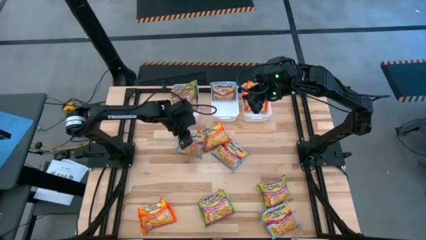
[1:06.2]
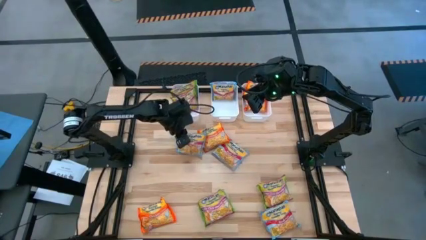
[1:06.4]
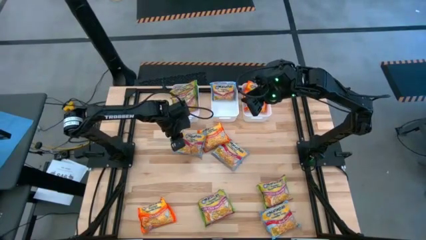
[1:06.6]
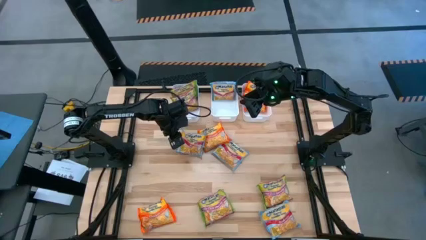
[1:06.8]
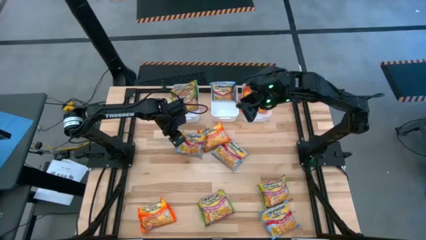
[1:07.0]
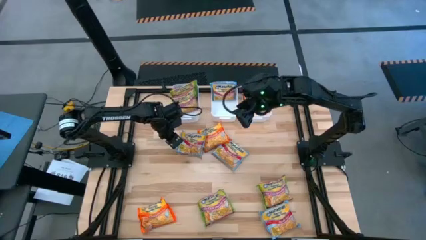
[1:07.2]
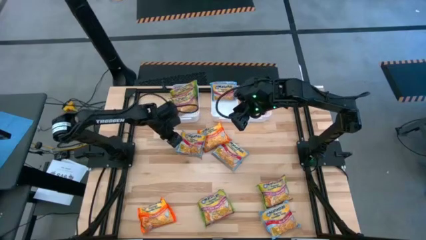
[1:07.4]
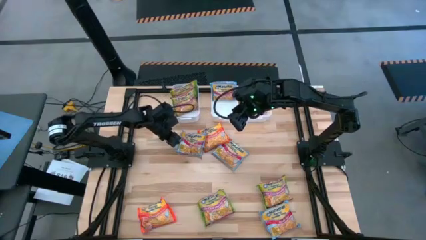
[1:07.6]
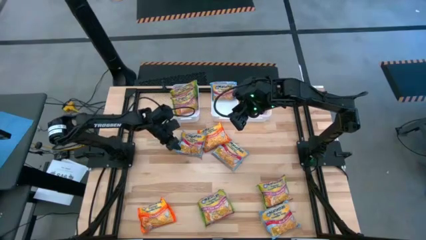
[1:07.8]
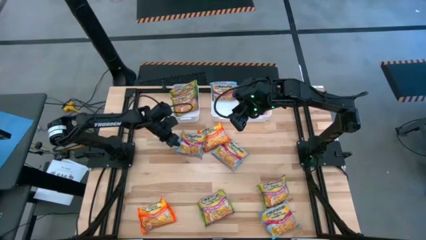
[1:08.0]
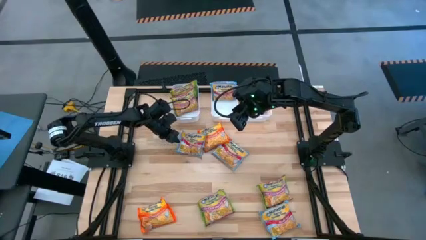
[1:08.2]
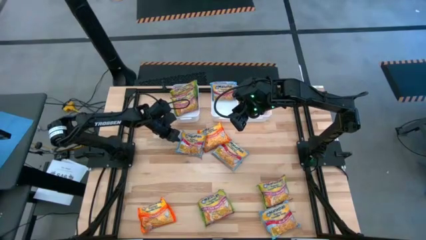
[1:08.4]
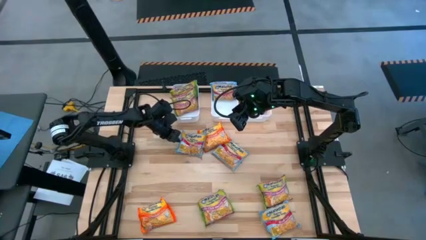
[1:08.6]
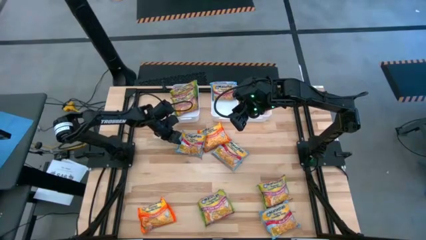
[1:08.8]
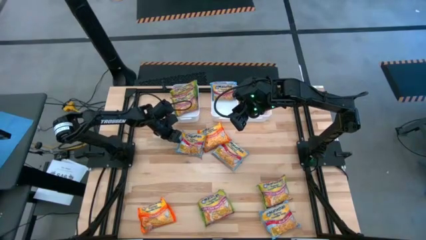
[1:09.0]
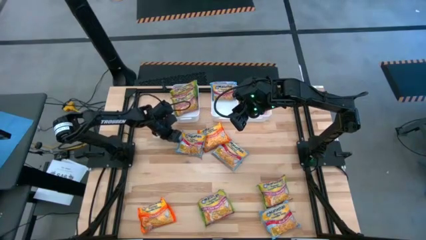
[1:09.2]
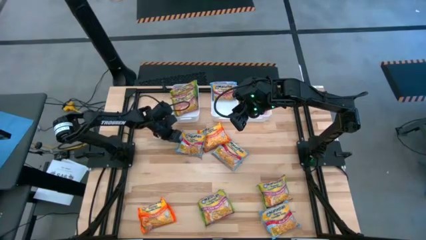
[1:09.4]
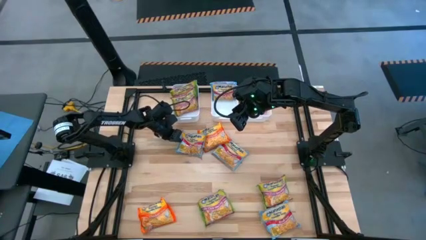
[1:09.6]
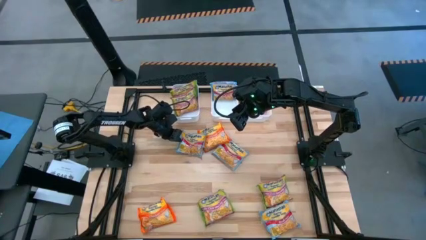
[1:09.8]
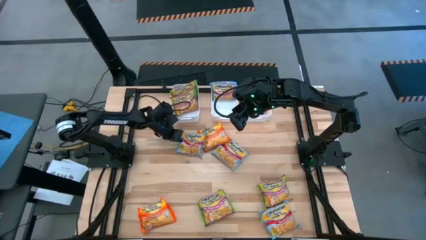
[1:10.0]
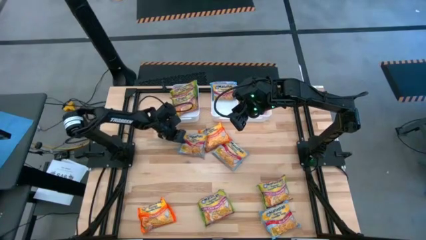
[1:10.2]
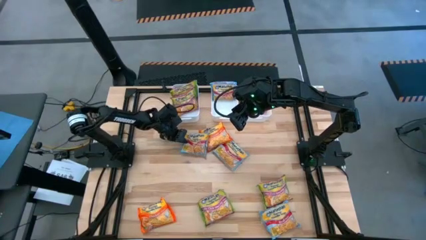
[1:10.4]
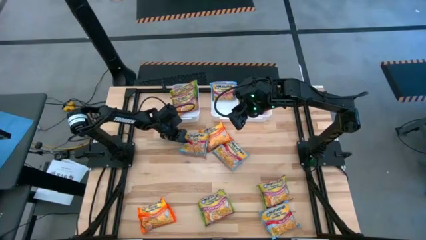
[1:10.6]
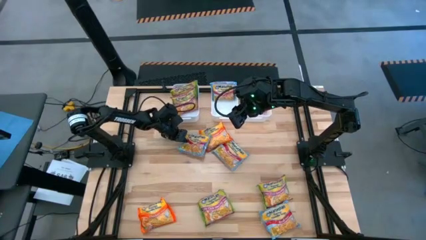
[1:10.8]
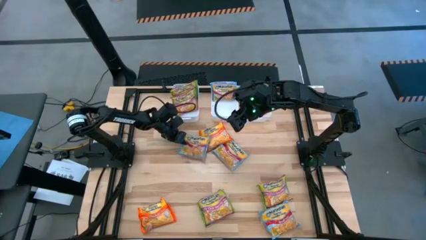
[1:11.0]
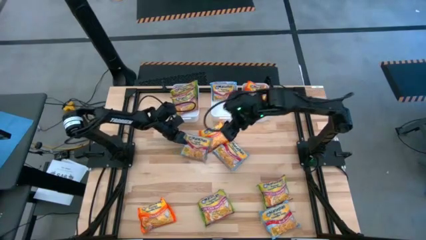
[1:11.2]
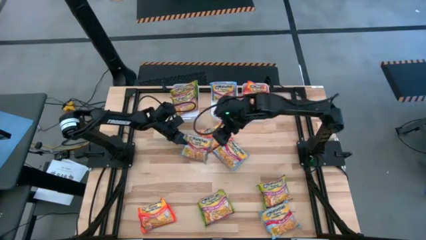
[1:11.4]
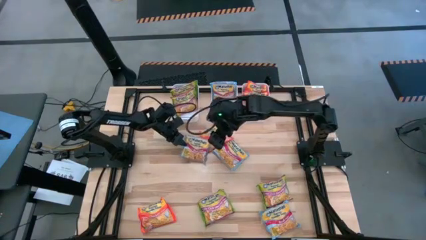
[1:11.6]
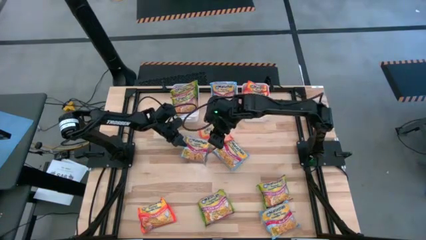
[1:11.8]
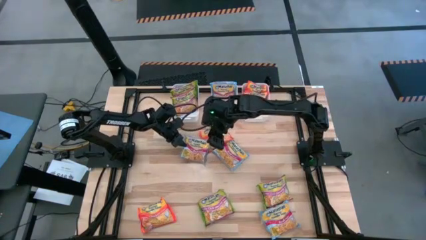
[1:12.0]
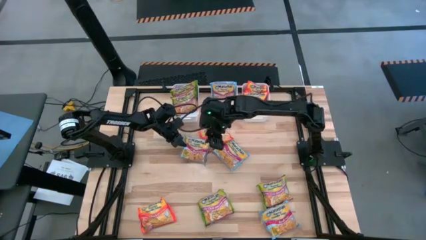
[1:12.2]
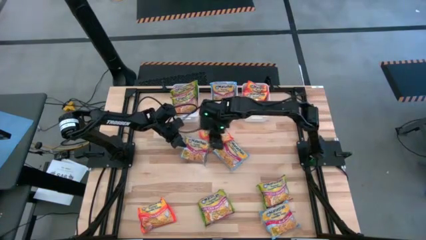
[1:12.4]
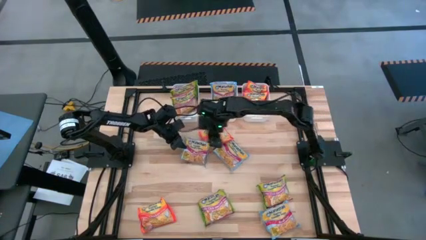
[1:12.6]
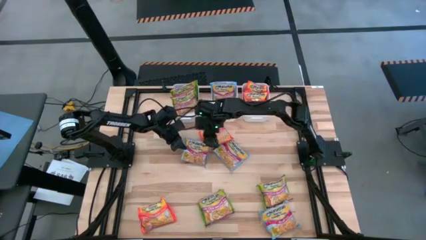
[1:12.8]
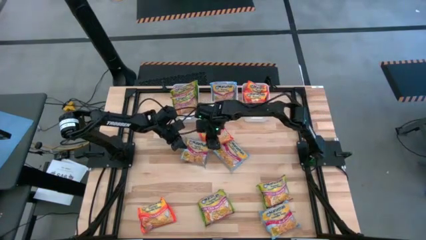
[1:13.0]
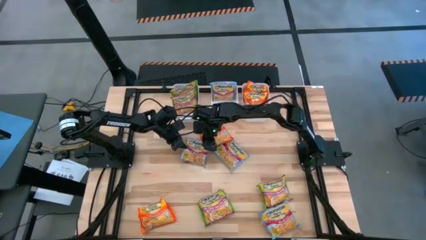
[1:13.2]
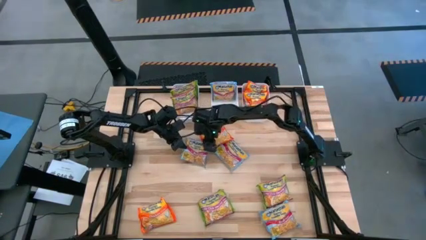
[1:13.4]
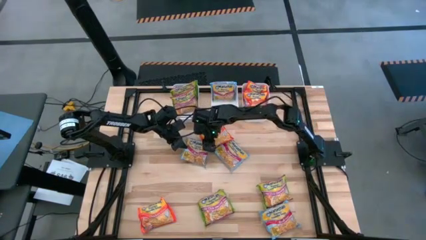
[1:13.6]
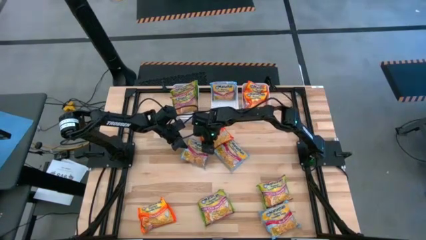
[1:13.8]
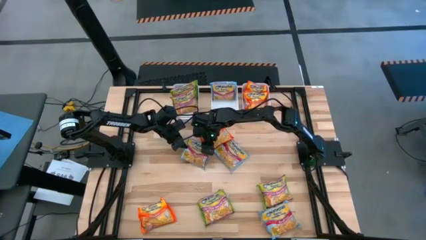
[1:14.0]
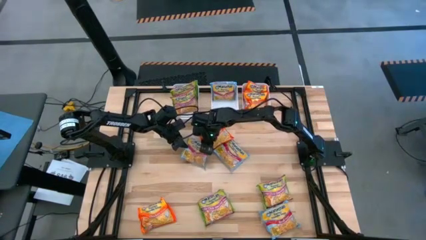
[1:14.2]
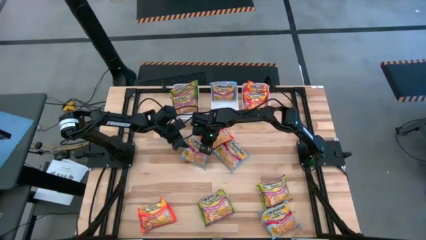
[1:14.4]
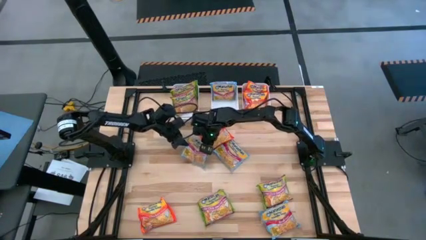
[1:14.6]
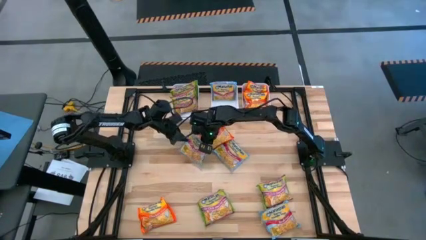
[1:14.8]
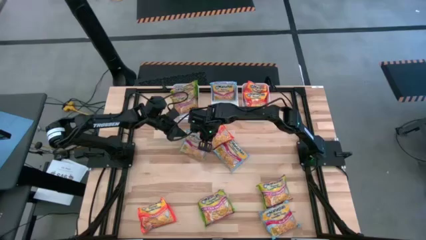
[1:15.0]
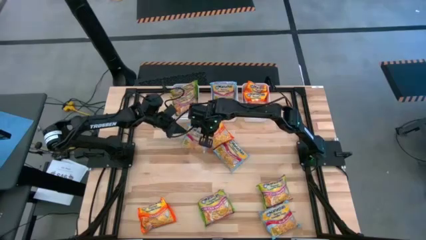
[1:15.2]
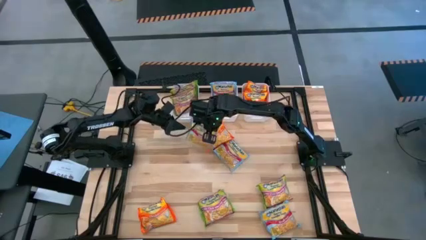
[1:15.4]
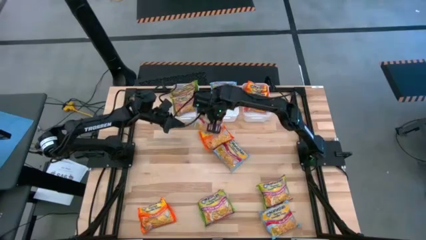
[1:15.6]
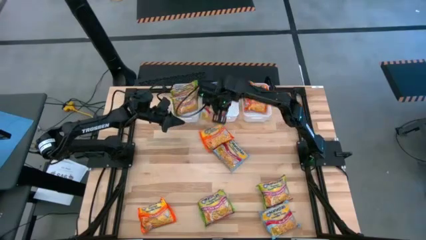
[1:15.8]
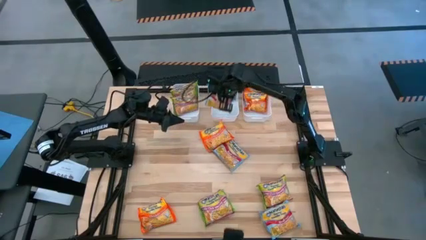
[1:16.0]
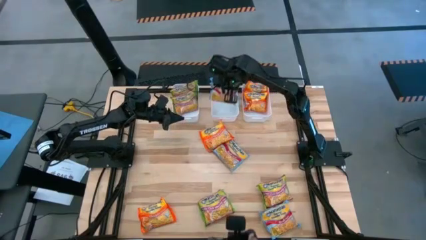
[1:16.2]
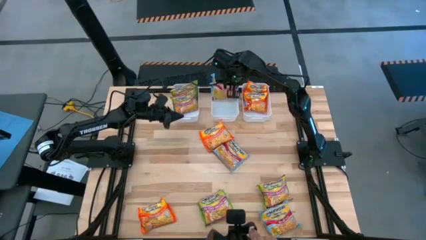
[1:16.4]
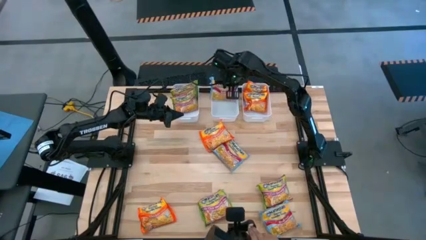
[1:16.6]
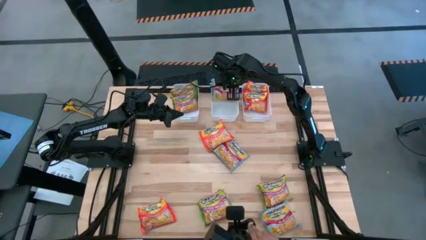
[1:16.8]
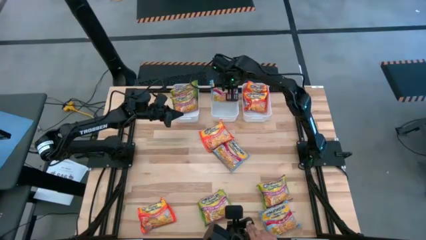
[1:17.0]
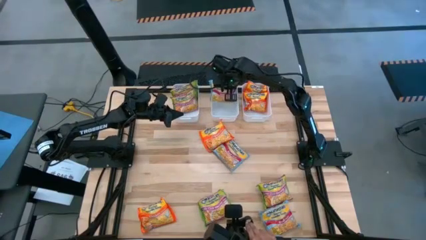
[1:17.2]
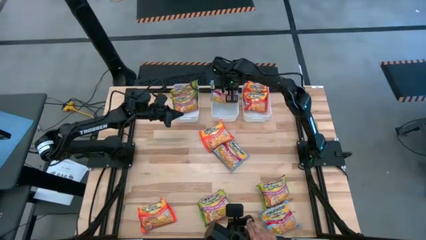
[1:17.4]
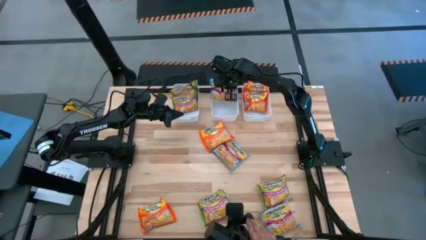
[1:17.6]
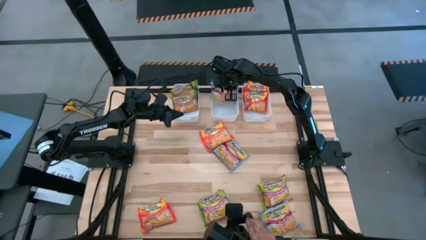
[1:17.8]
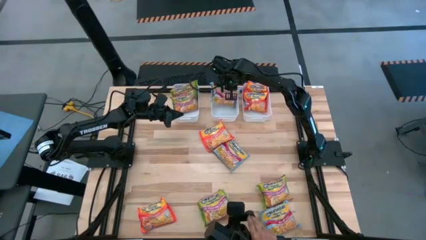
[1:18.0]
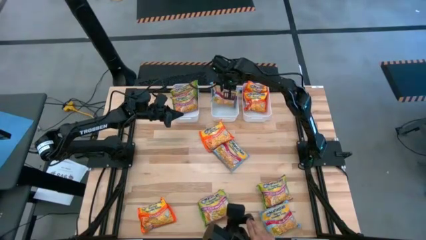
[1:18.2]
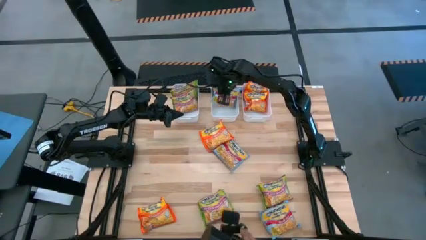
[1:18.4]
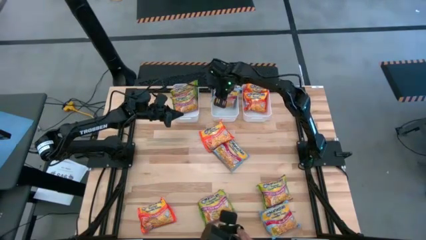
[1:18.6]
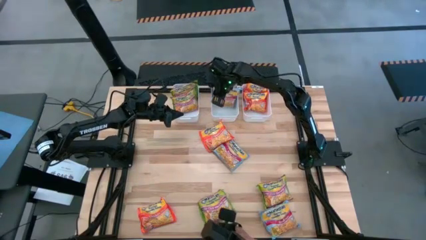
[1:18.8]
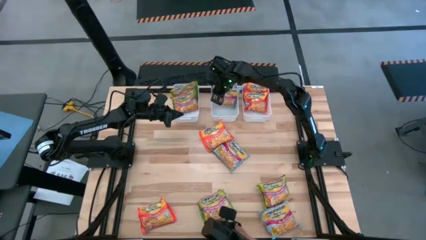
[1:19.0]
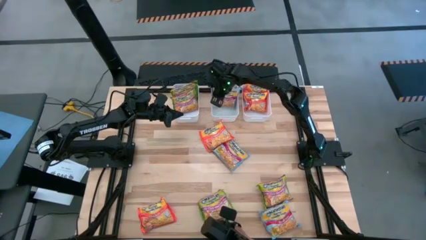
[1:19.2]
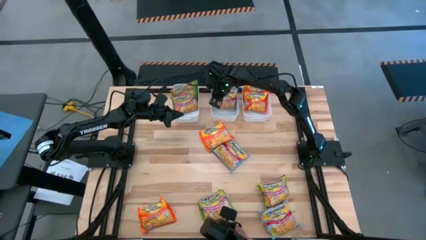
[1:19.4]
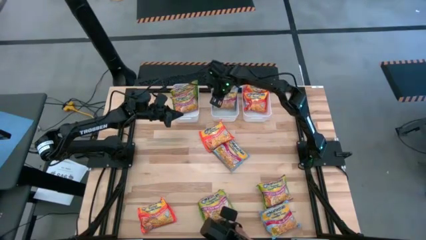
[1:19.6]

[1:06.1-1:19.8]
Task: Sort Maruchan noodles
Put the blue noodle pack into the middle white bin

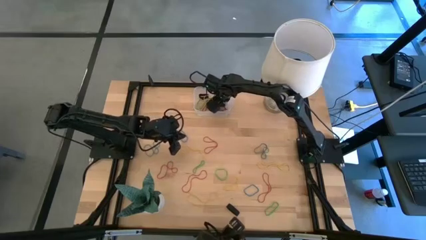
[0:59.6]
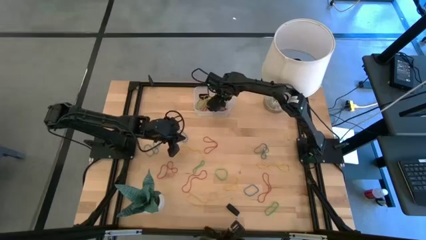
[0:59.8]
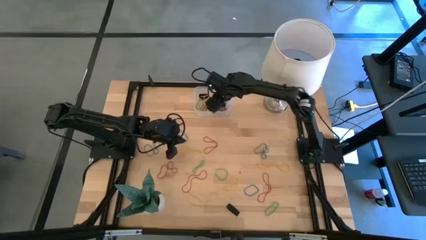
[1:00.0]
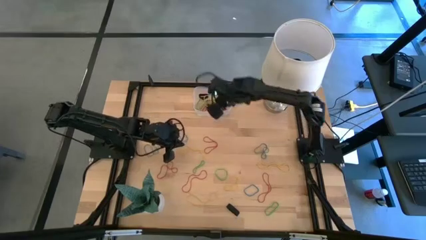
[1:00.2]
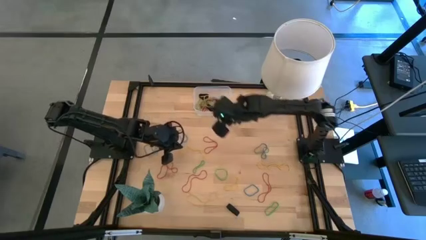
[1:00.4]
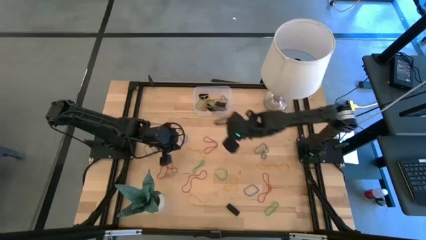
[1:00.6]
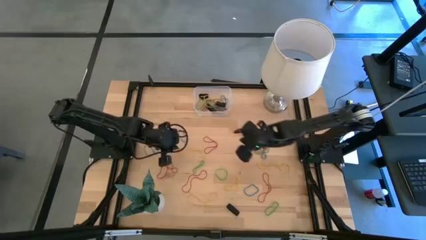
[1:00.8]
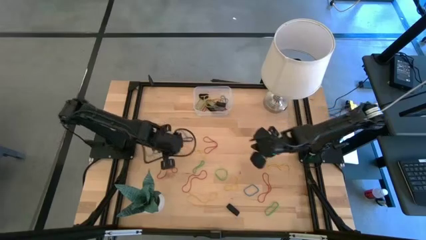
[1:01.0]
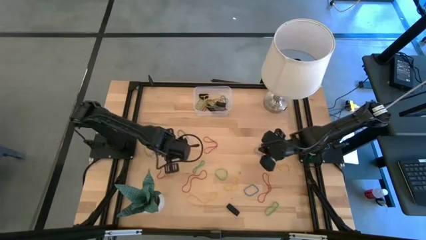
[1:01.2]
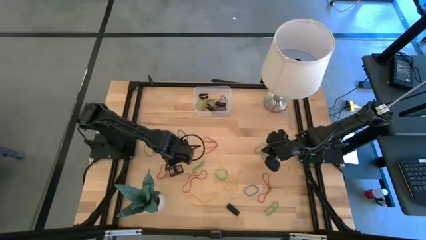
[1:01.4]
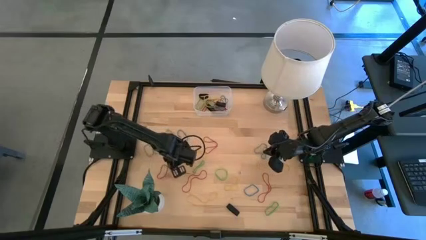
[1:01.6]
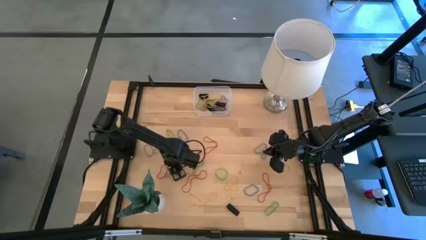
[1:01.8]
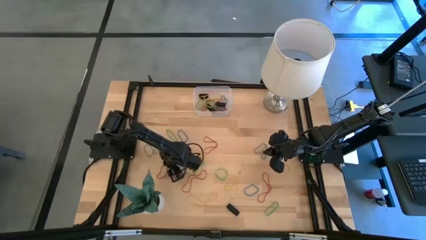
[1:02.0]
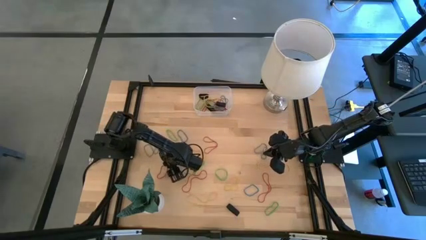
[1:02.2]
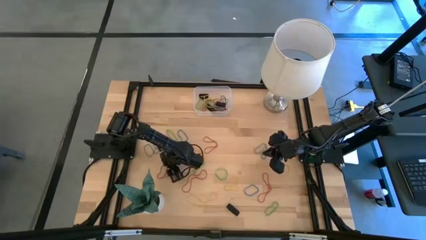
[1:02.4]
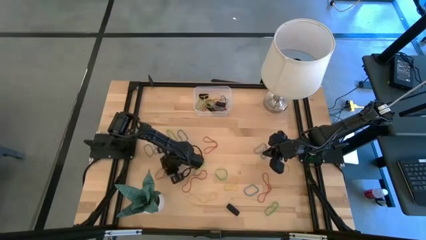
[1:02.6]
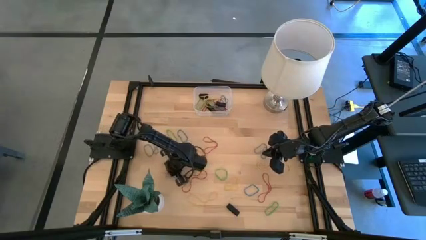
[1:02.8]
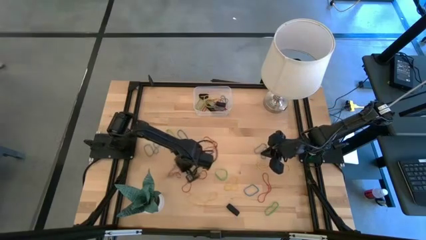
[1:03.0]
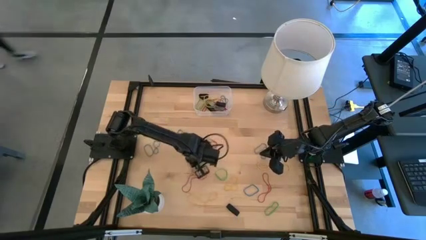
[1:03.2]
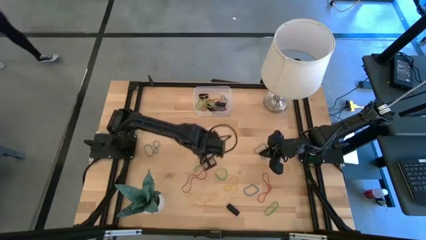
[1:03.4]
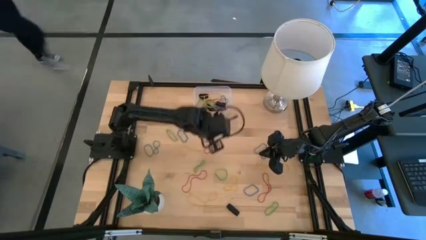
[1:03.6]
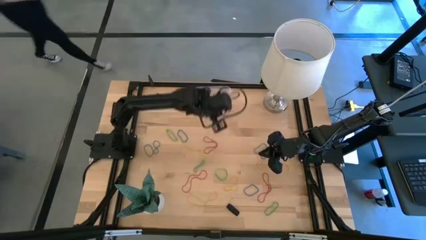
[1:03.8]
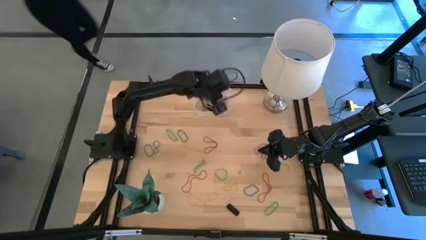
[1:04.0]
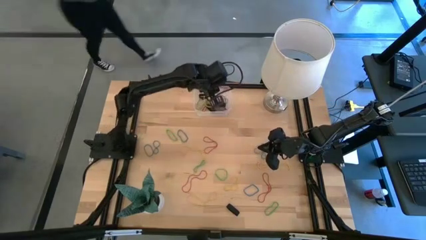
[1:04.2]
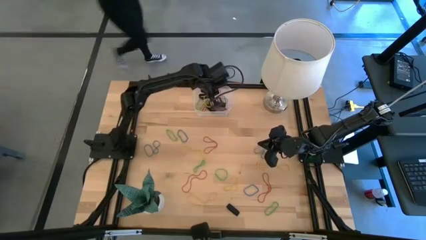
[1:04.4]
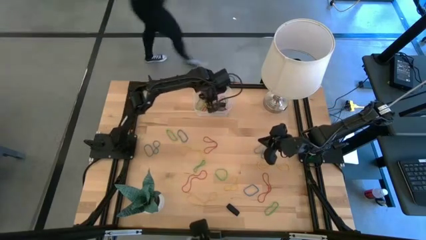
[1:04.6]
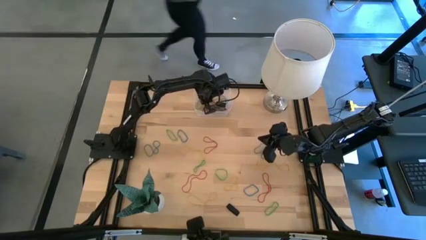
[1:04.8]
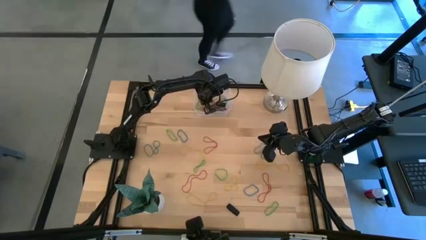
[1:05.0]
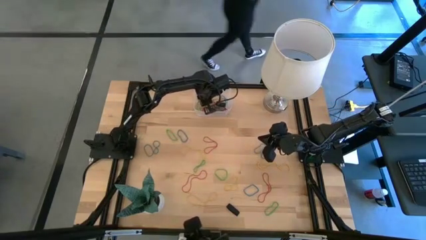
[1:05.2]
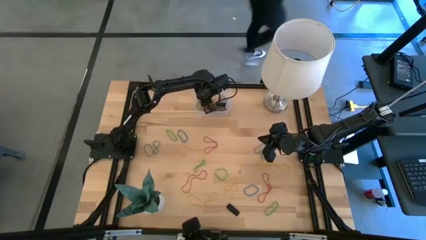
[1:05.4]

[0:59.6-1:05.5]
Task: Pick and place rubber bands into bin
Put the red rubber band into the transparent bin
